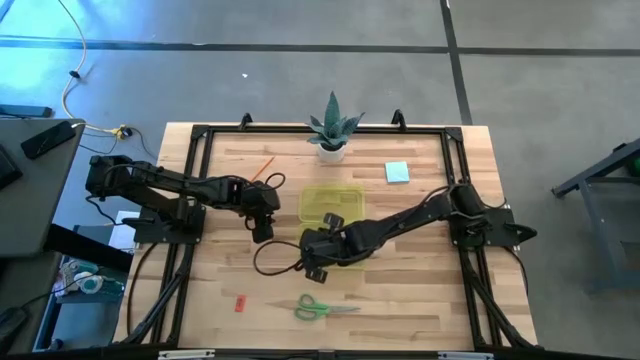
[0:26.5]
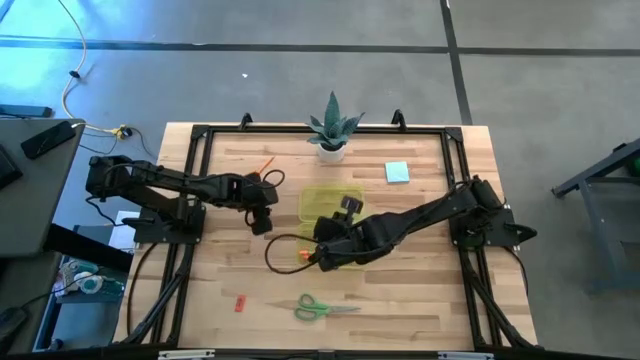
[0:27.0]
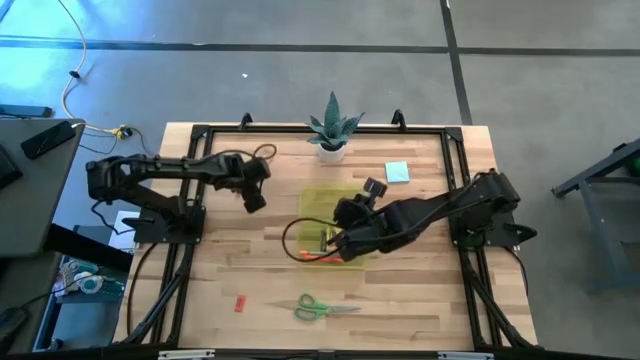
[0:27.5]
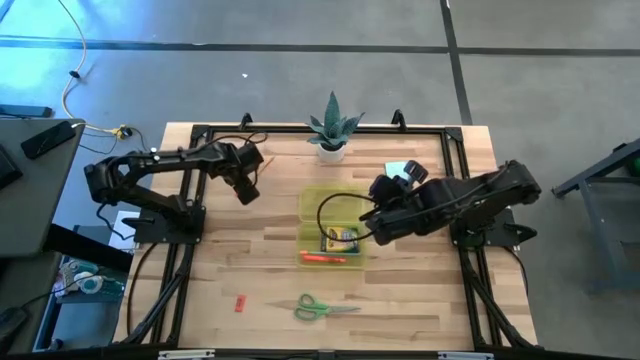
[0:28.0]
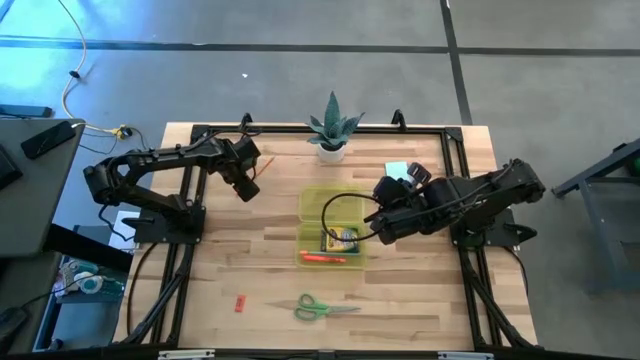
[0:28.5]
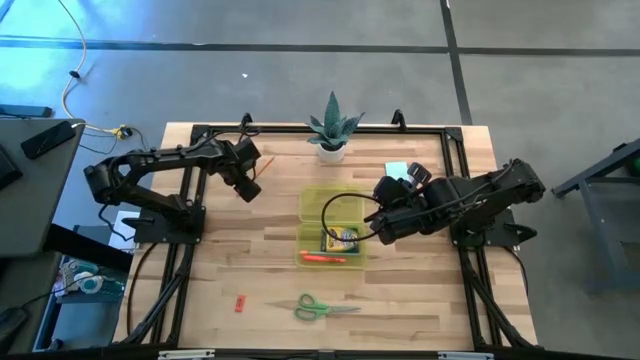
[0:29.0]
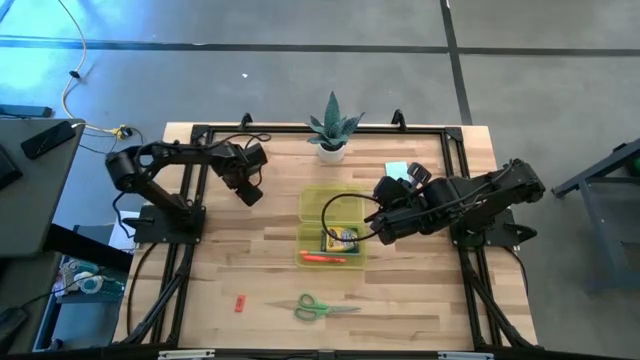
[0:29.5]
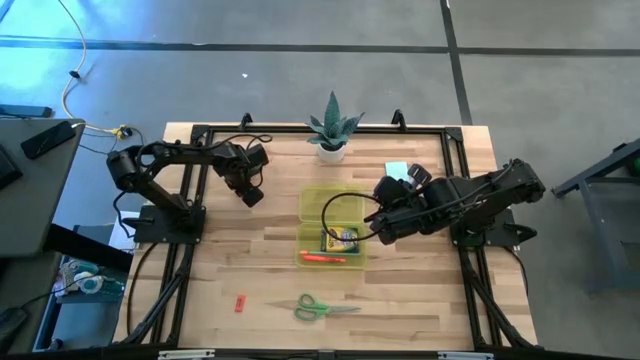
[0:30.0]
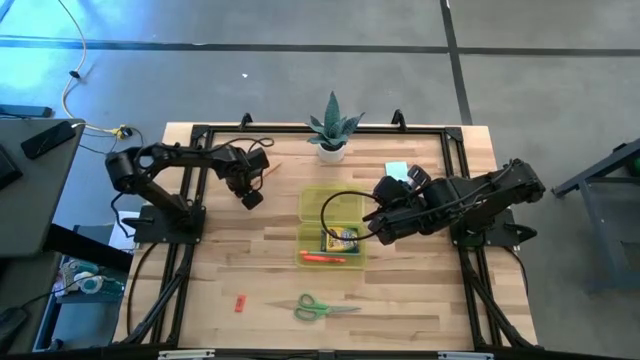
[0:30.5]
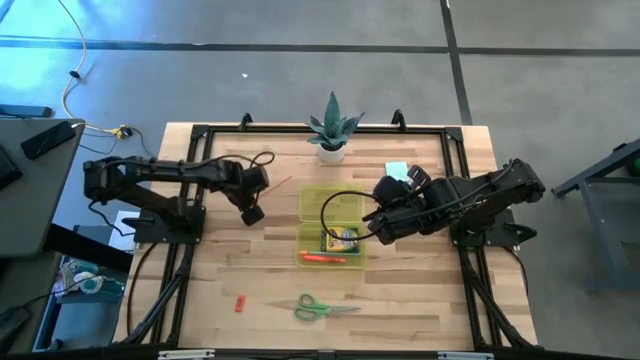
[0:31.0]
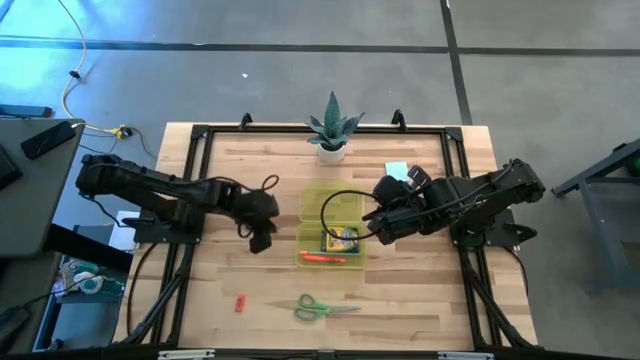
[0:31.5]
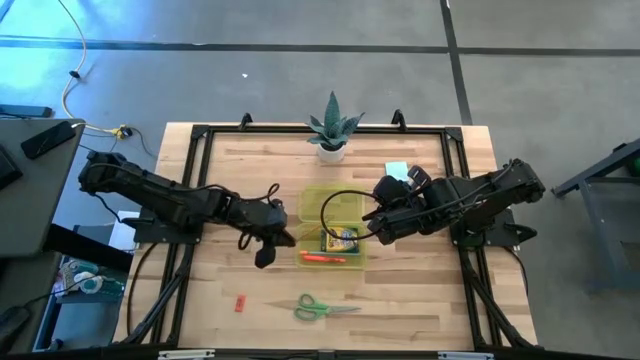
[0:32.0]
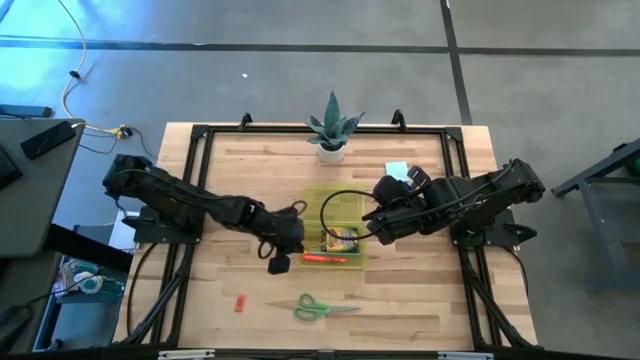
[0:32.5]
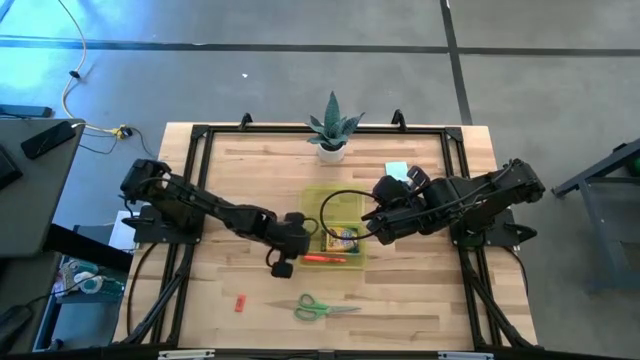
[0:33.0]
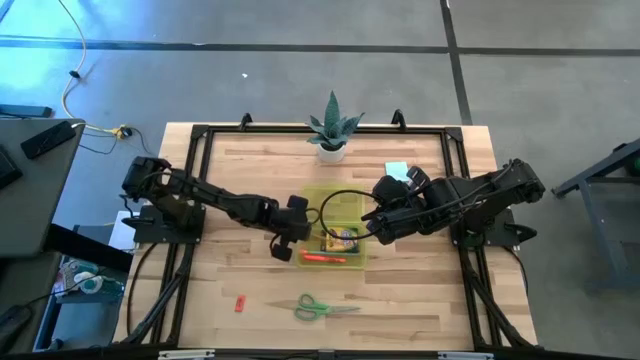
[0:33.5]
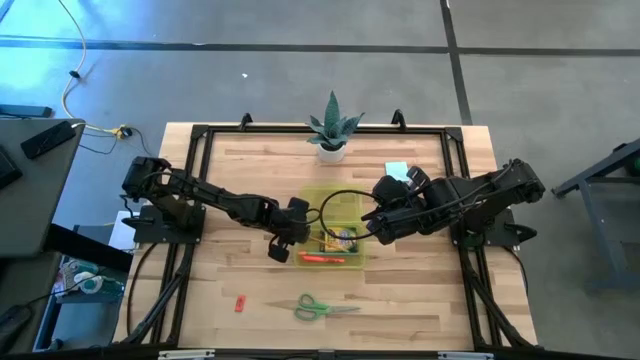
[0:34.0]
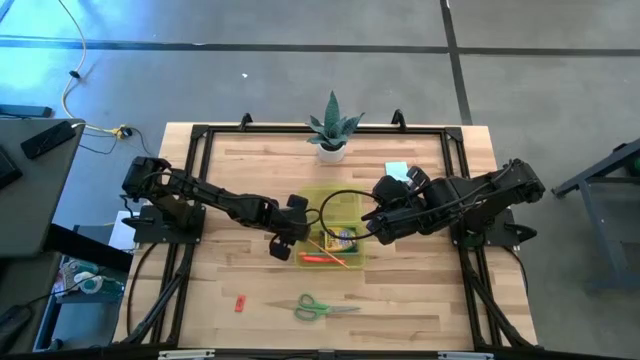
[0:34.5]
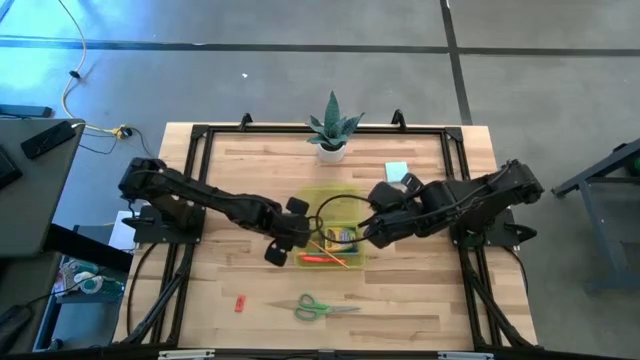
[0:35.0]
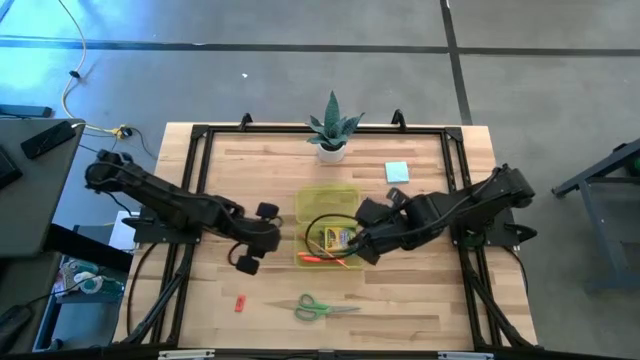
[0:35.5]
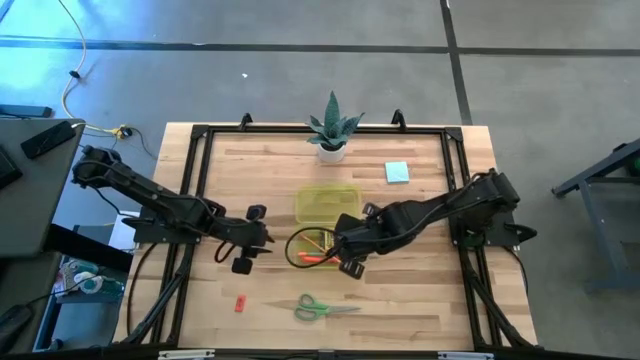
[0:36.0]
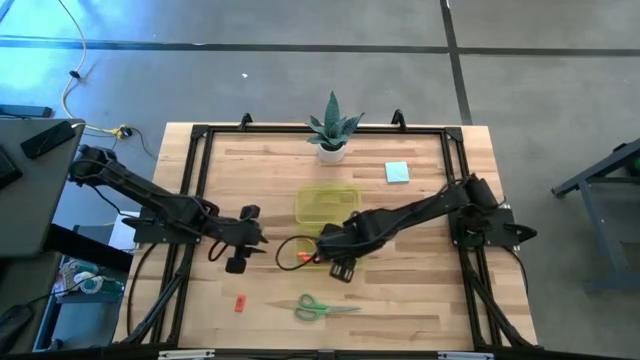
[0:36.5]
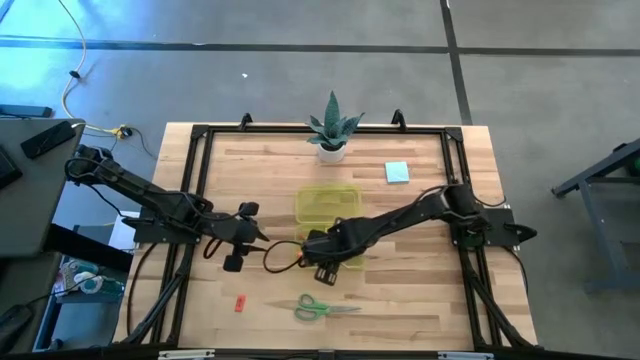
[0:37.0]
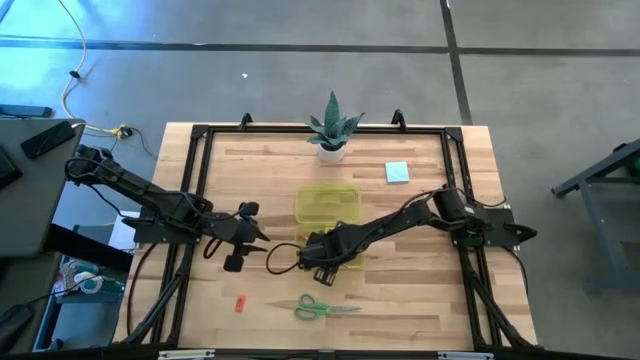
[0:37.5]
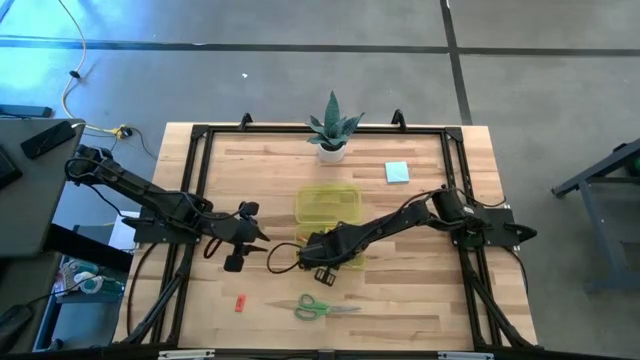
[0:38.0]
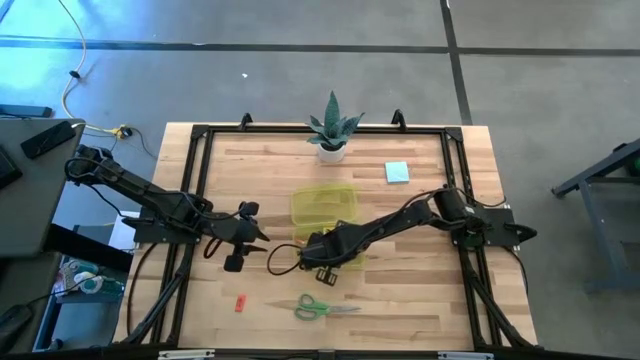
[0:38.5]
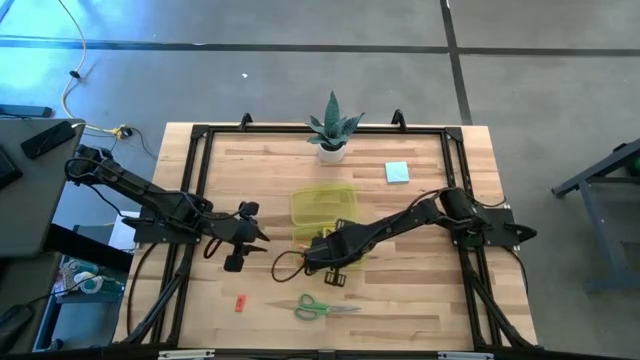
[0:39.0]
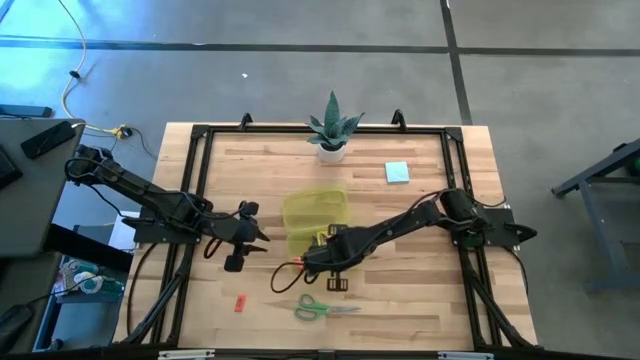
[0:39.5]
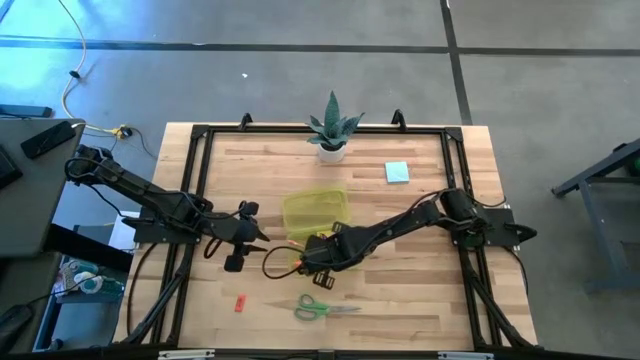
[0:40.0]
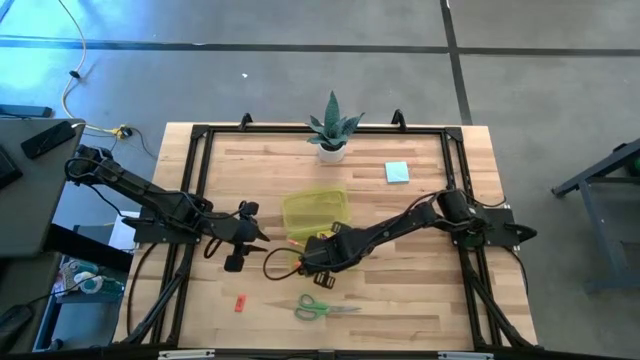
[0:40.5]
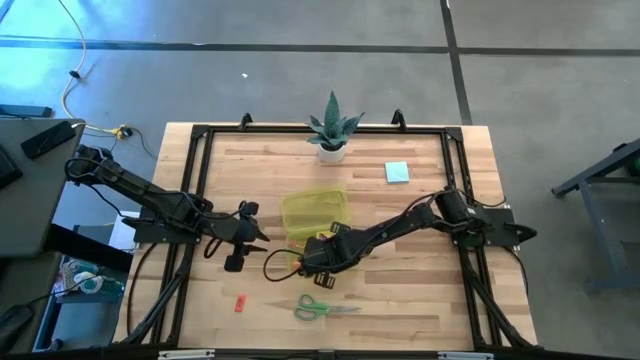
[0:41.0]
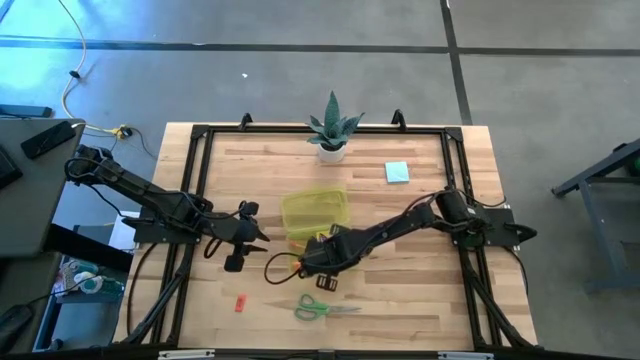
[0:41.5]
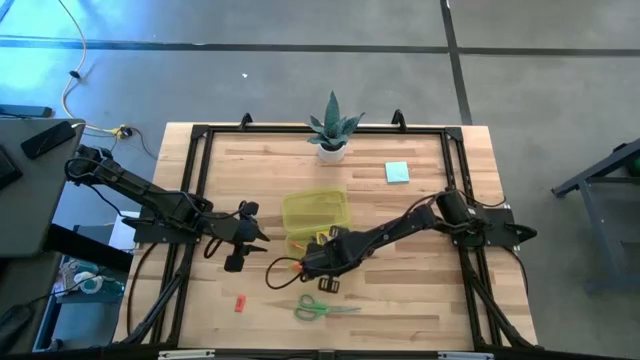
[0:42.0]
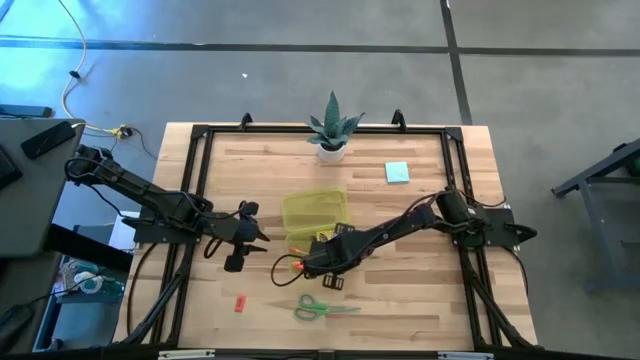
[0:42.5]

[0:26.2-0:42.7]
Task: Pack school essentials
Put the orange pencil into the yellow school supply box

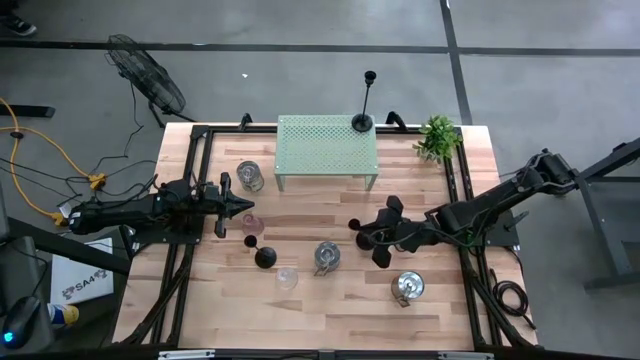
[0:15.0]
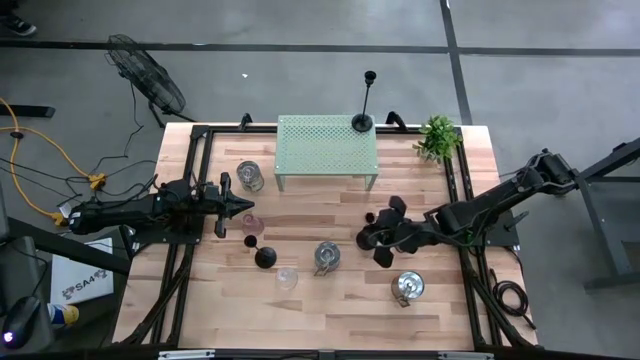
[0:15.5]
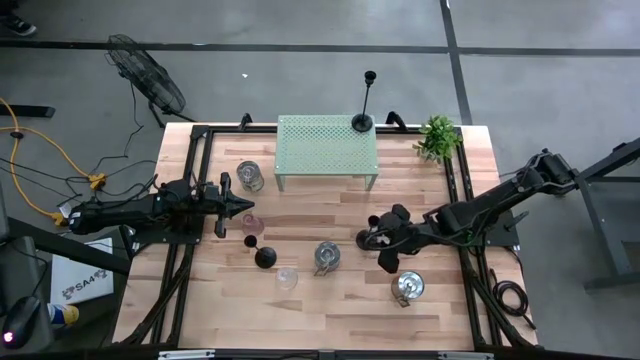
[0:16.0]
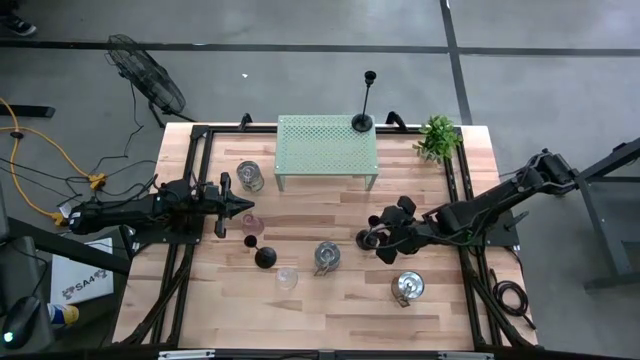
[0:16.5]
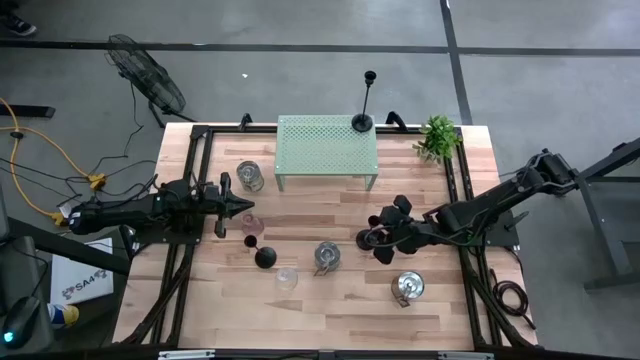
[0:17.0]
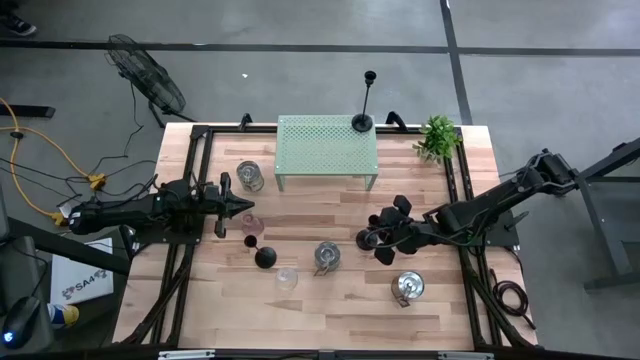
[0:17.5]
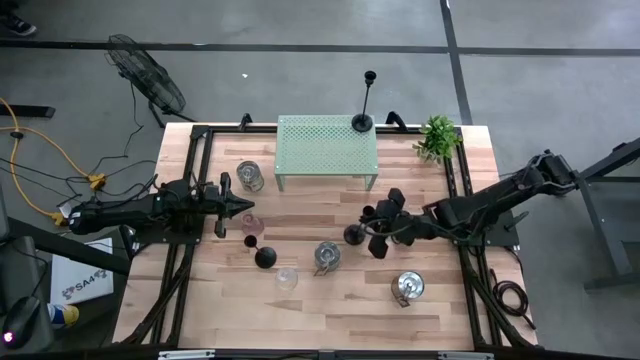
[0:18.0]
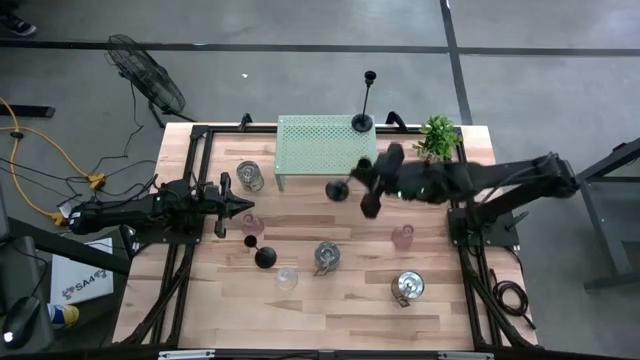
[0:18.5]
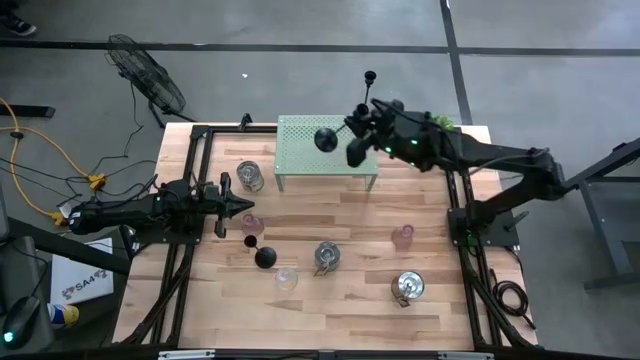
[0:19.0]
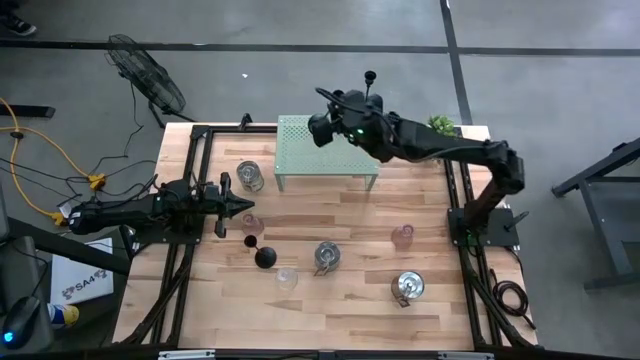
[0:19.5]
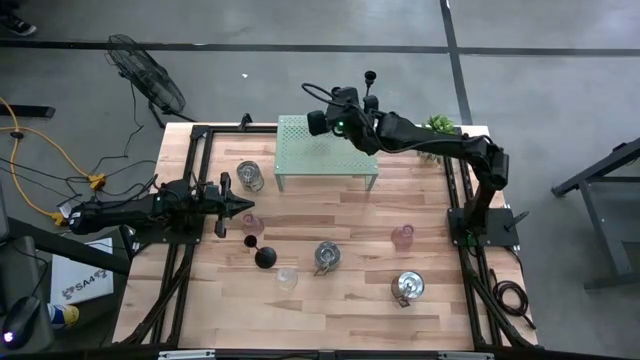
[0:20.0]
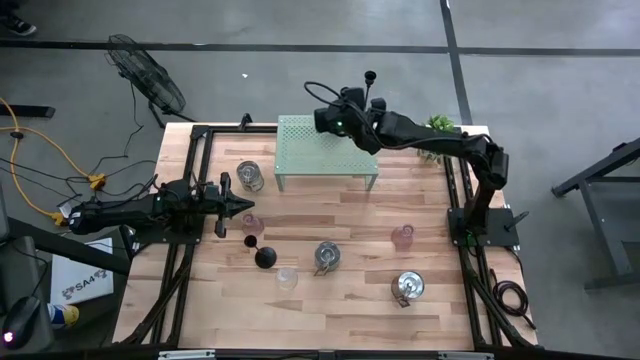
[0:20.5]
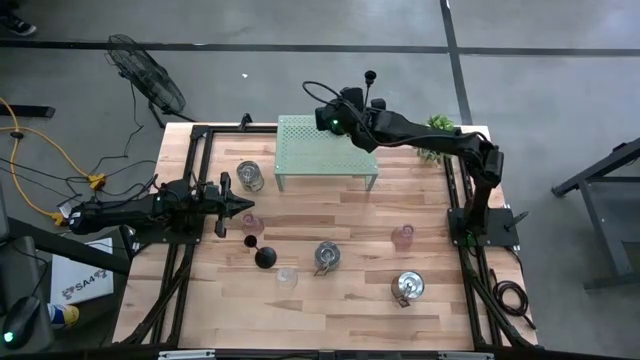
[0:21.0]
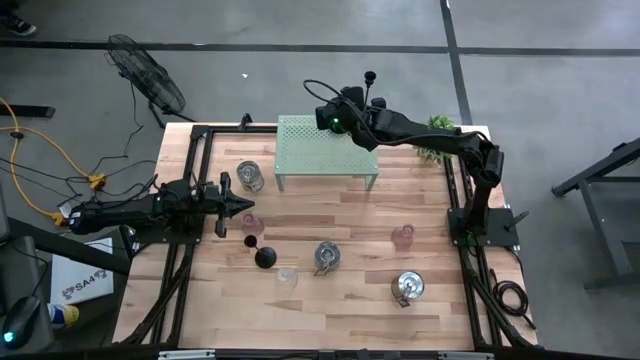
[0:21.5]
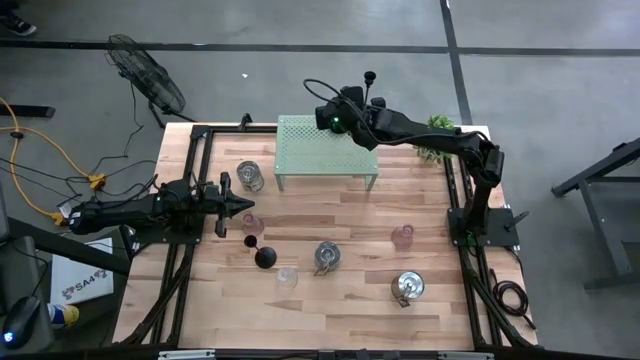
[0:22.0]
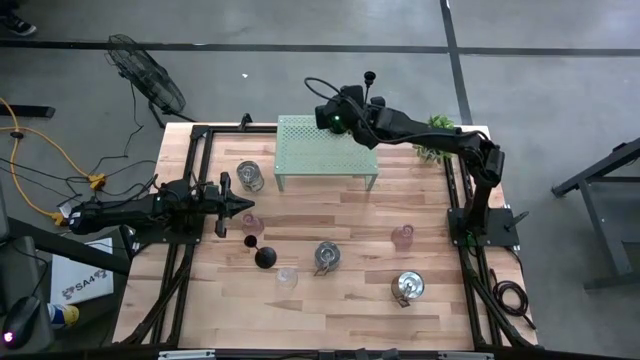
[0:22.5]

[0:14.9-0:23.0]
Task: Pick & Place candle stick holders
Put the right black candle holder on the shelf aligned with the black candle holder
